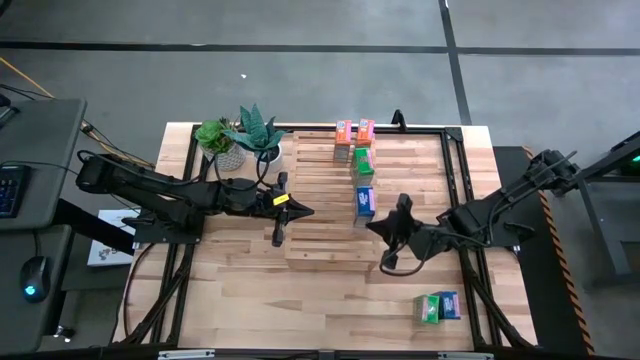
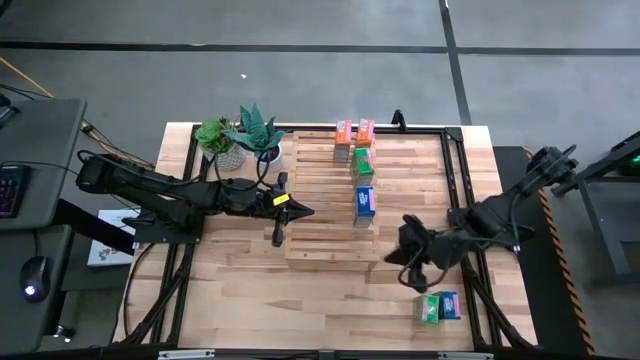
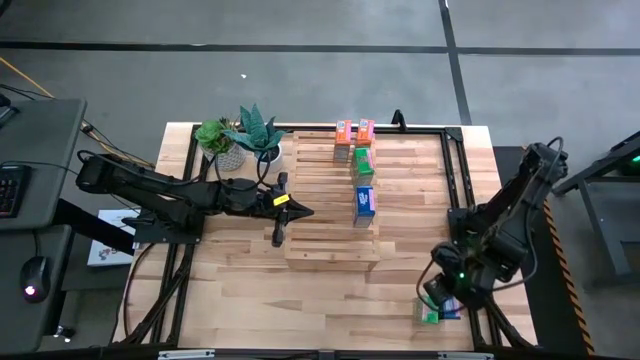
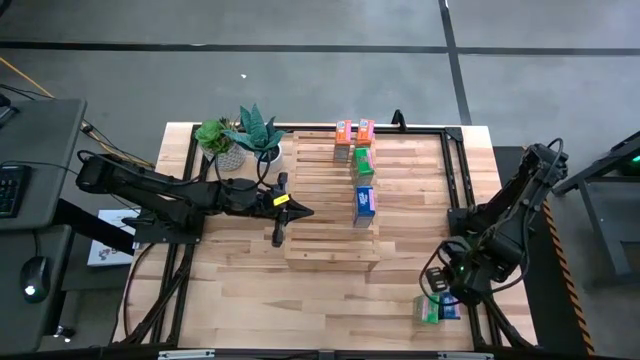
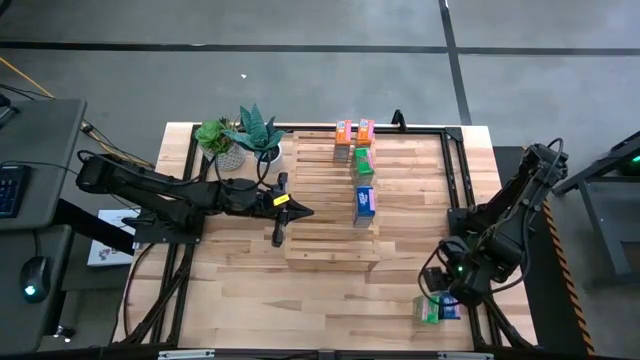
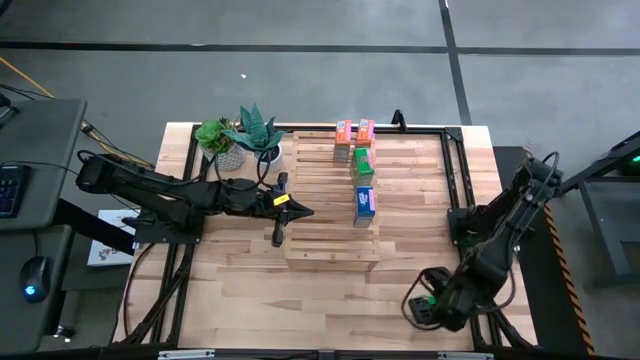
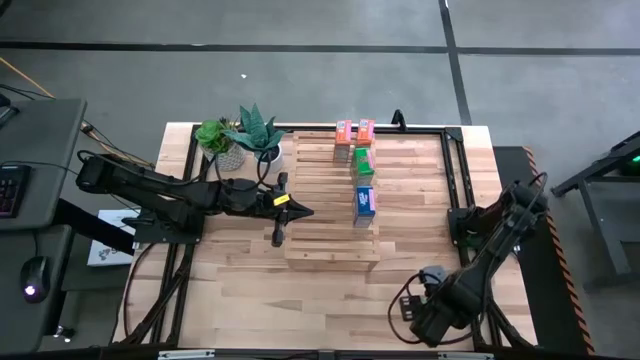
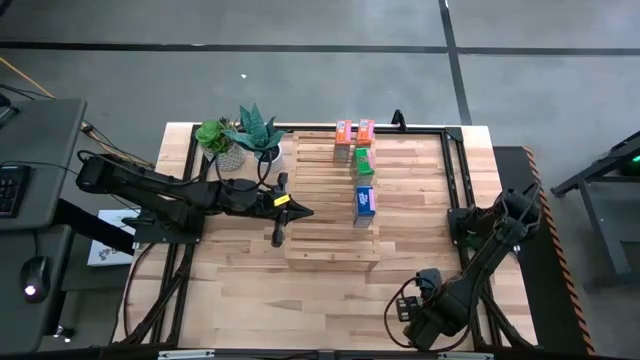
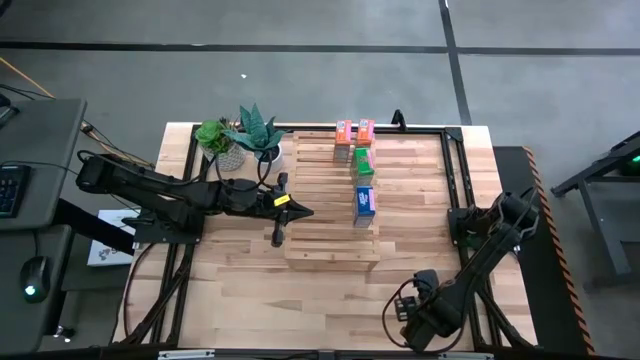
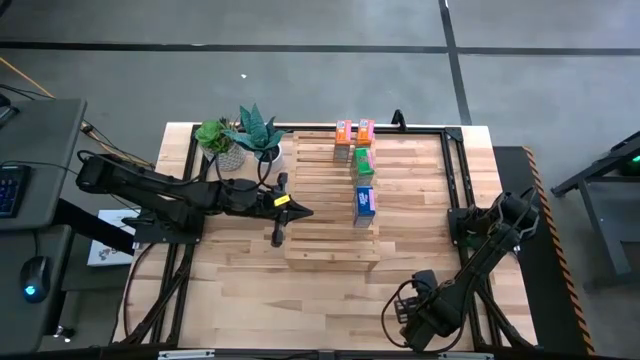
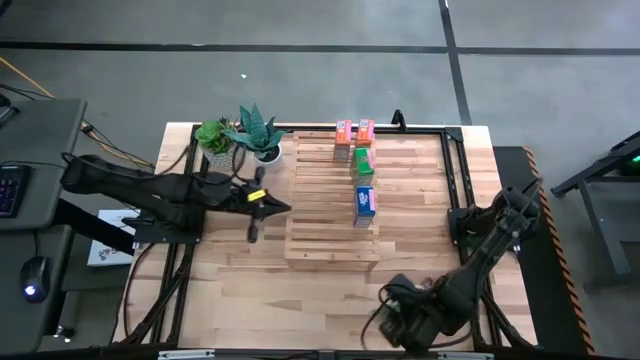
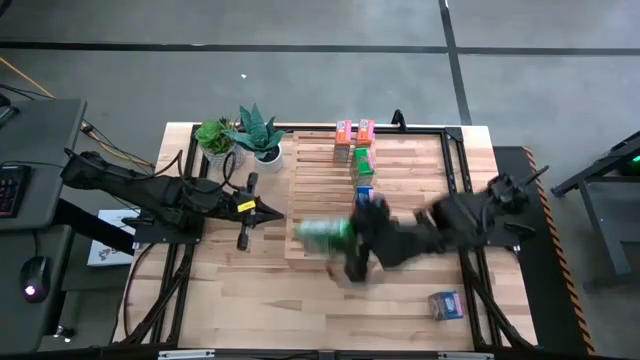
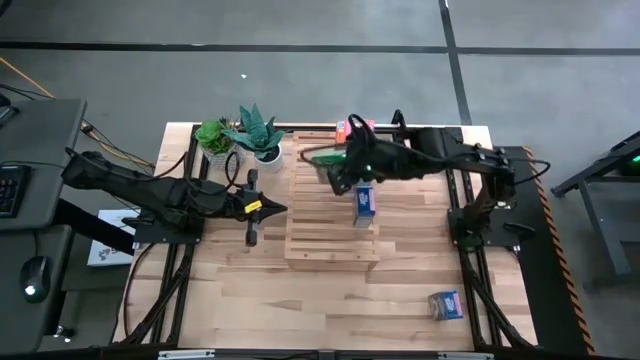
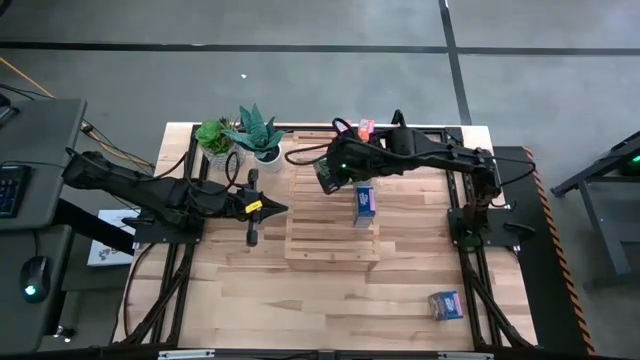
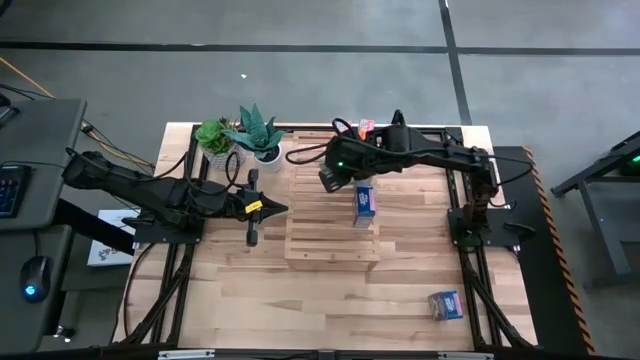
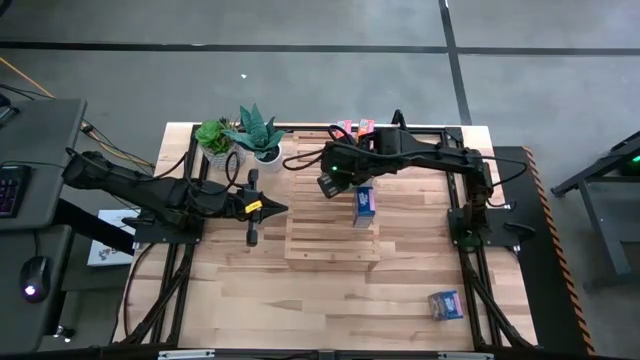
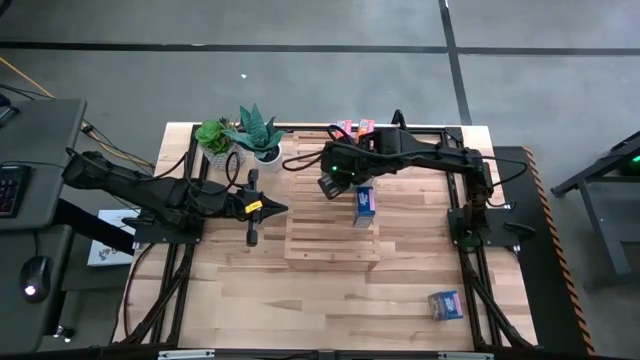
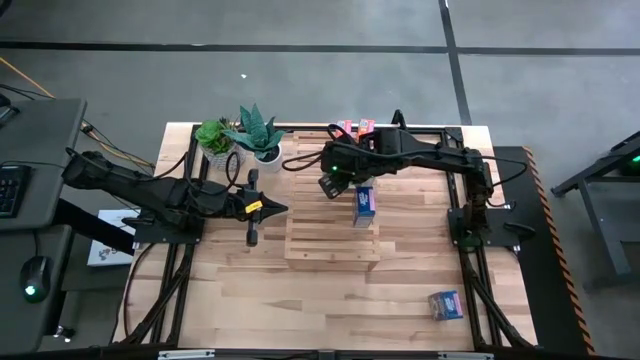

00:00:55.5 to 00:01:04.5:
Task: Stack cereal on shelf
Put the green cereal box on the shelf aligned with the other green cereal box

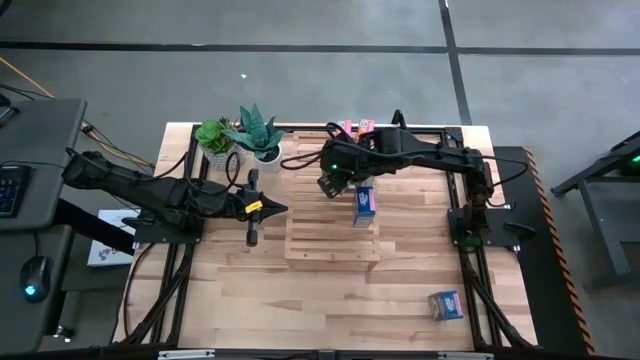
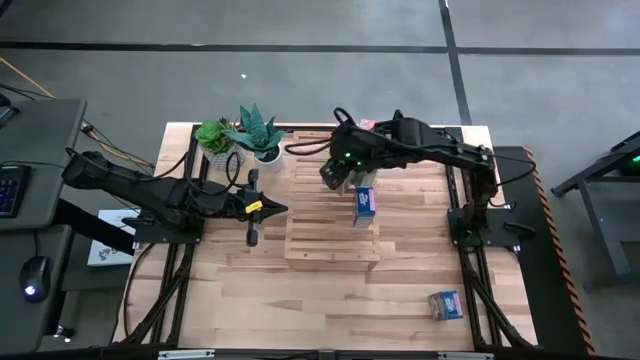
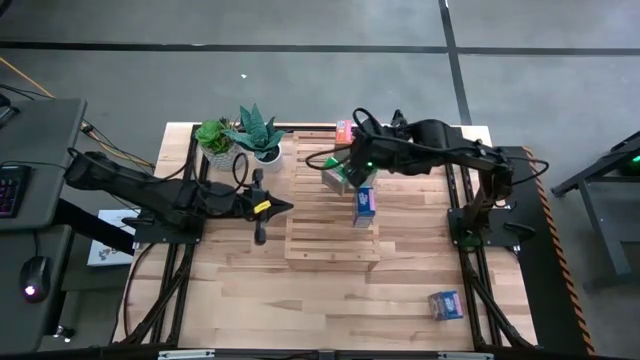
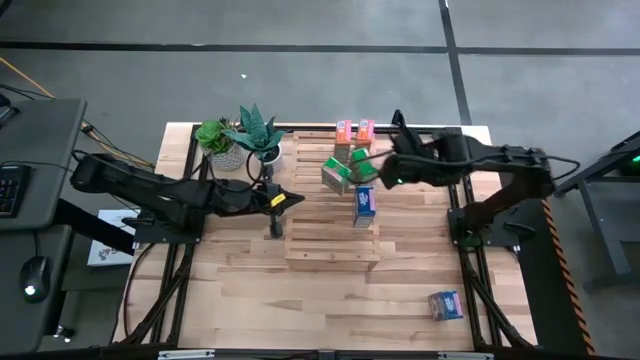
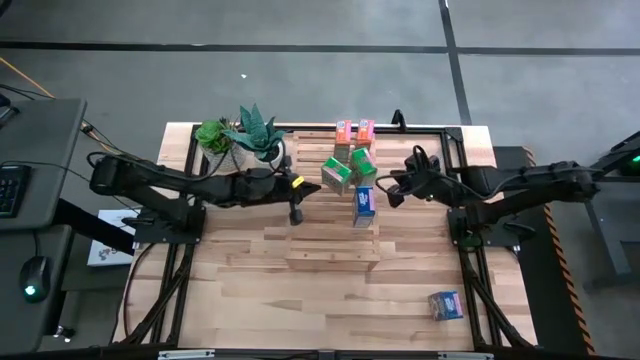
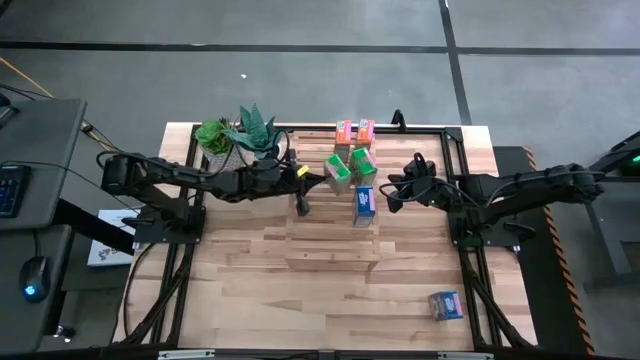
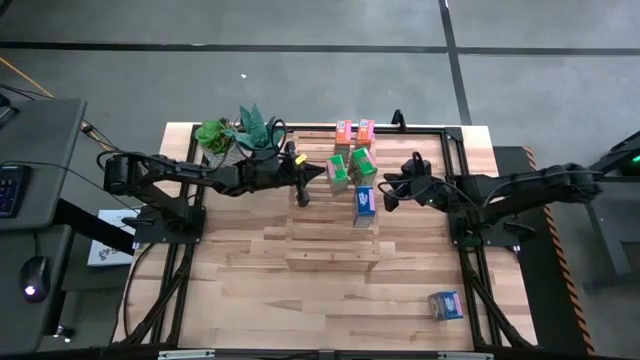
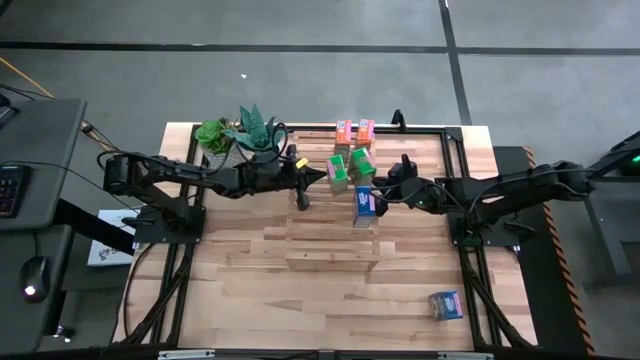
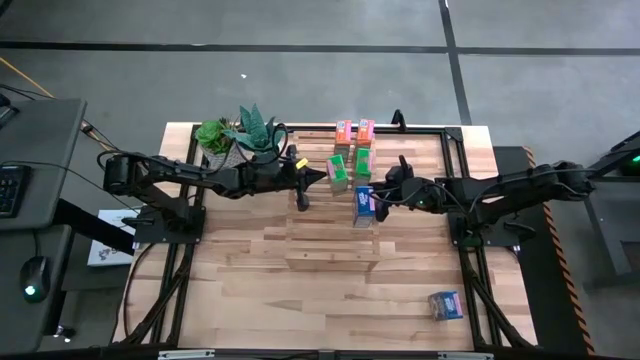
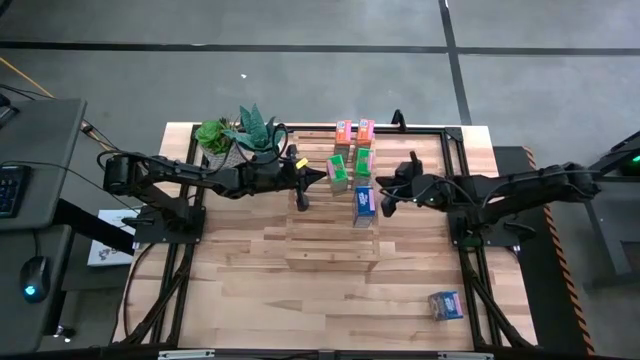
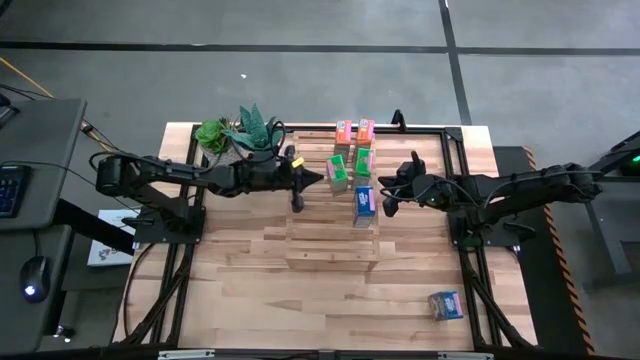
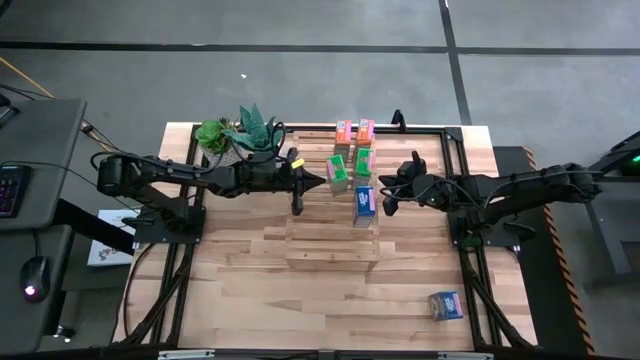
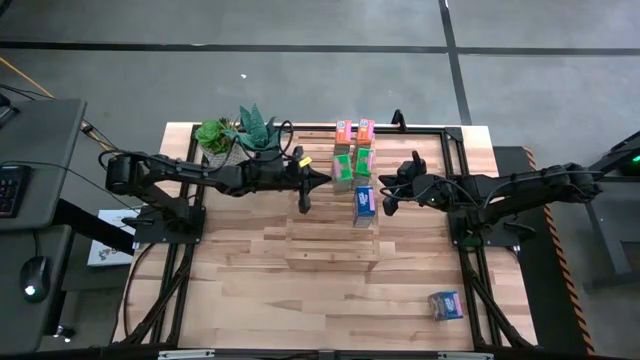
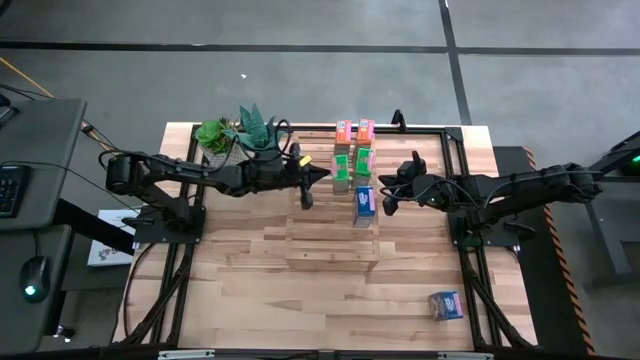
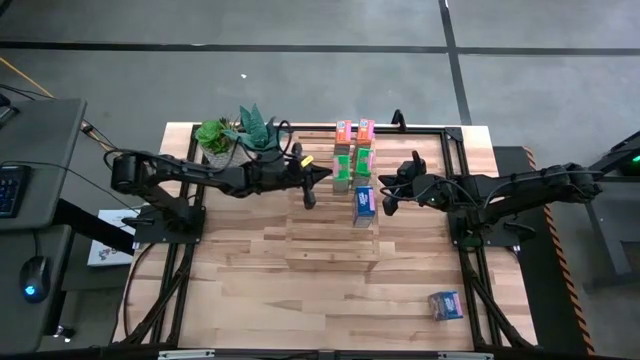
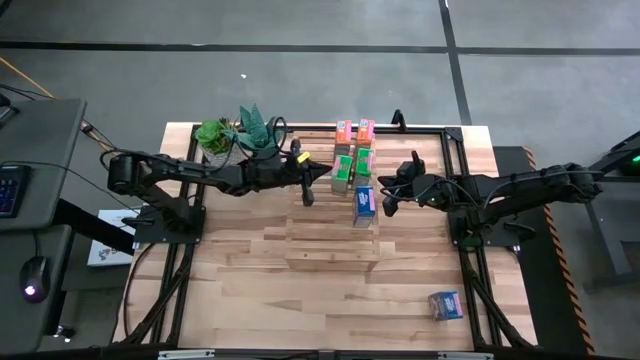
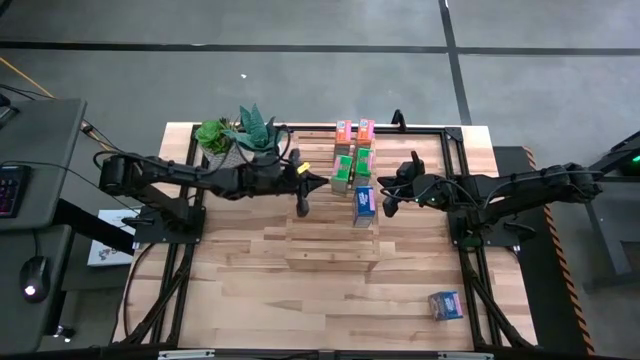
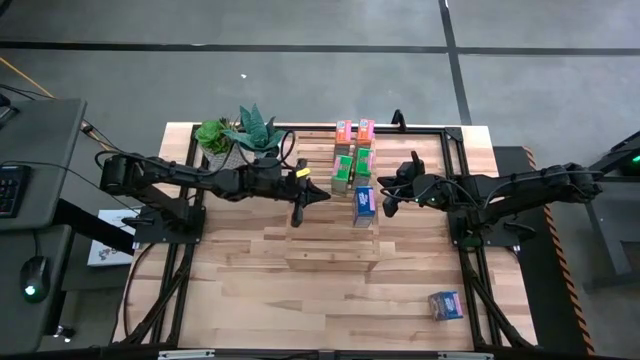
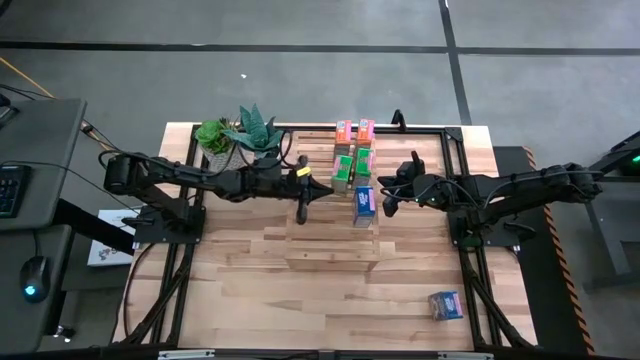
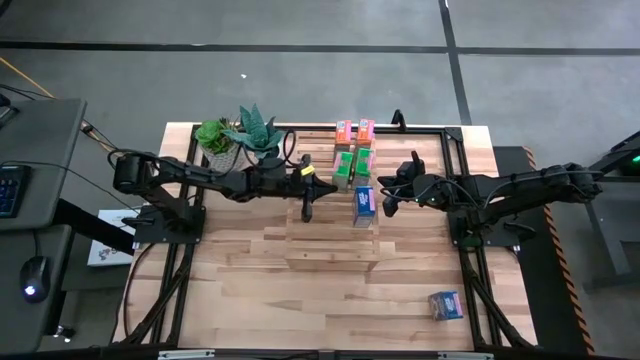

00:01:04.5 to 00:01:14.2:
Adjust the green cereal boxes on the shelf

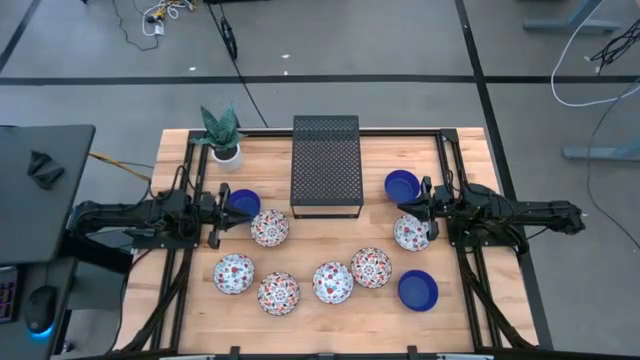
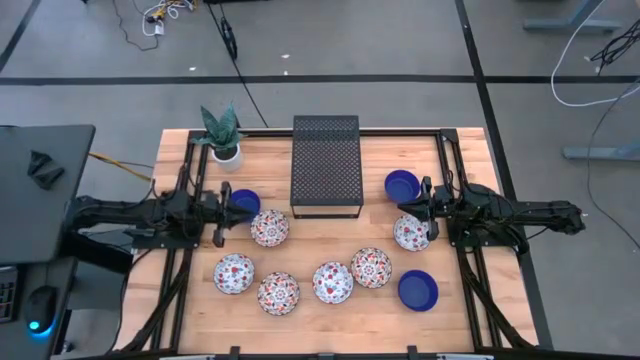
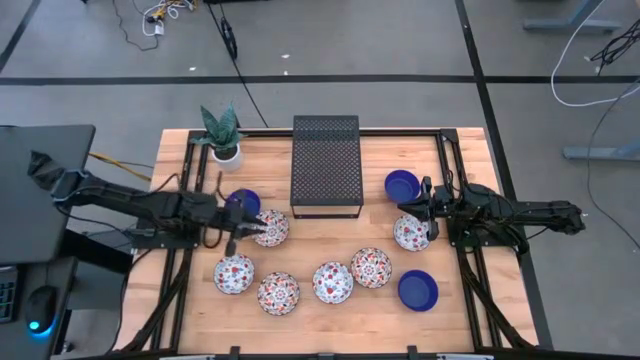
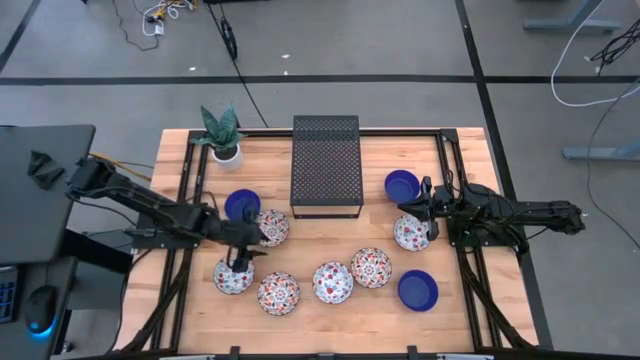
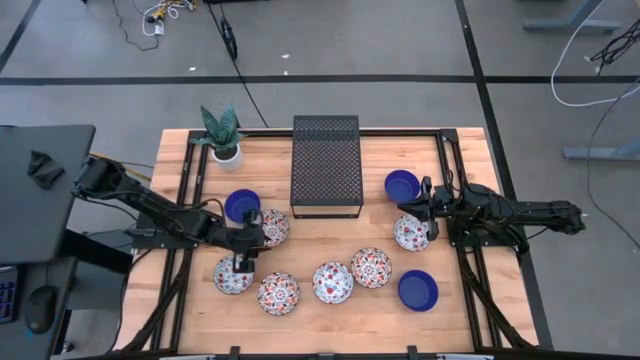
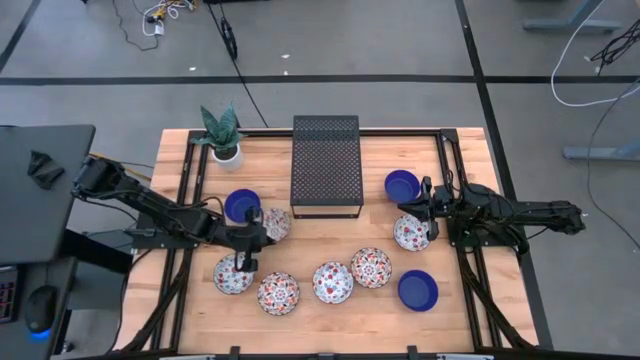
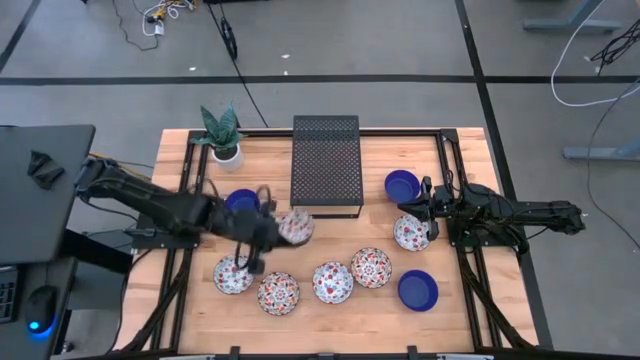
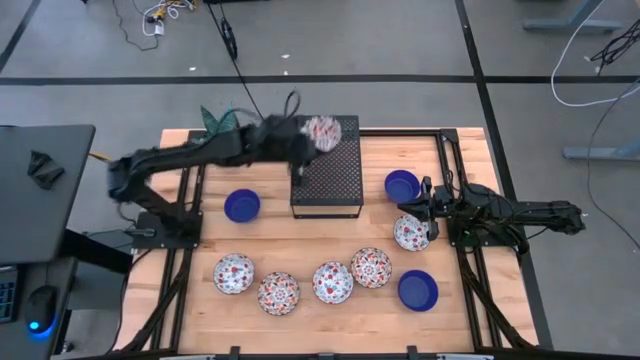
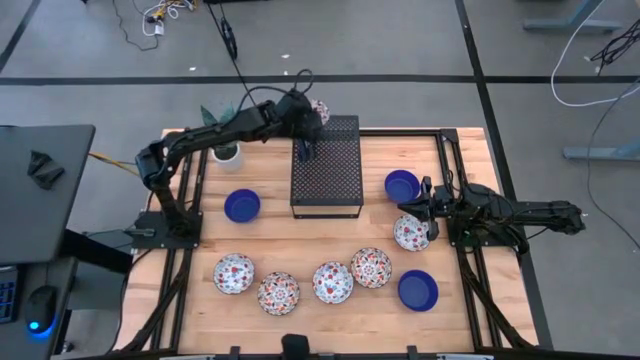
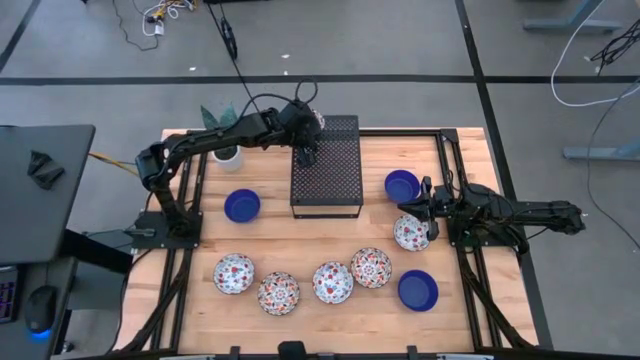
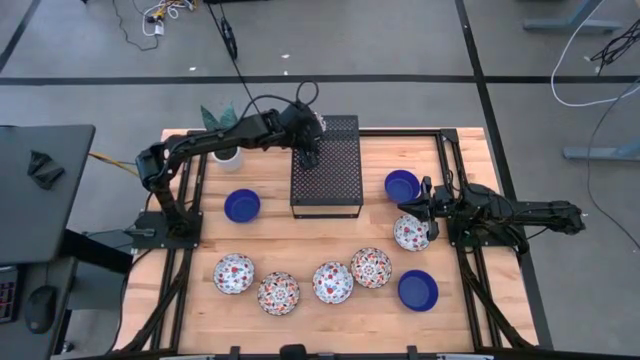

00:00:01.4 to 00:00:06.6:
Task: Pick & Place Mini bowls
Put the top orange patterned bowl on the shelf
